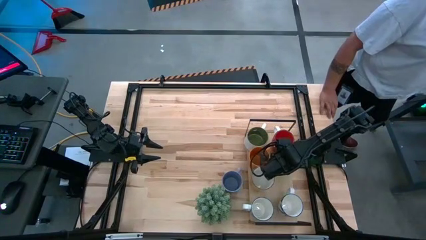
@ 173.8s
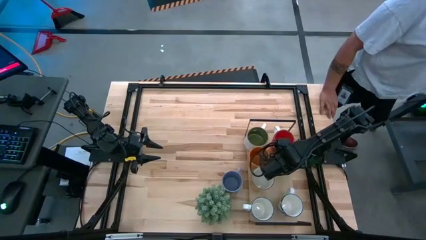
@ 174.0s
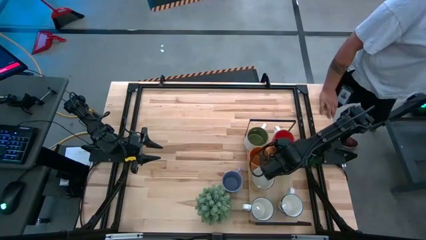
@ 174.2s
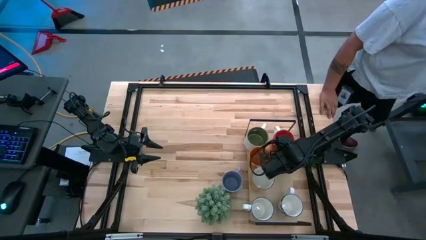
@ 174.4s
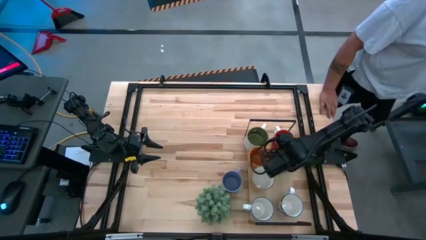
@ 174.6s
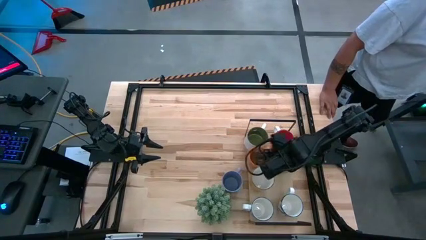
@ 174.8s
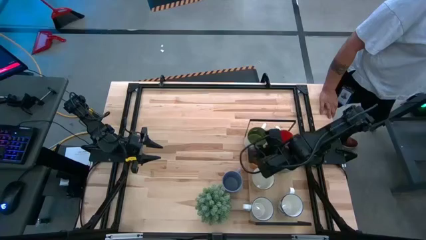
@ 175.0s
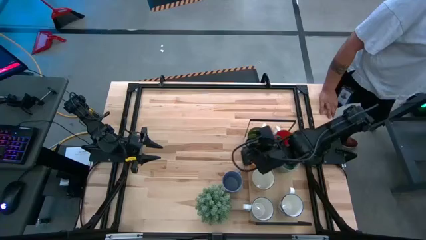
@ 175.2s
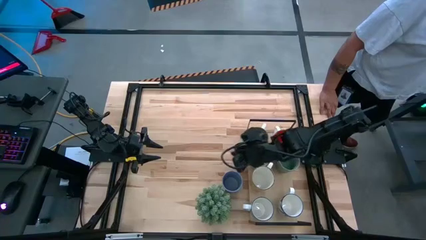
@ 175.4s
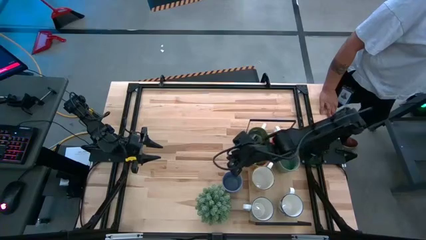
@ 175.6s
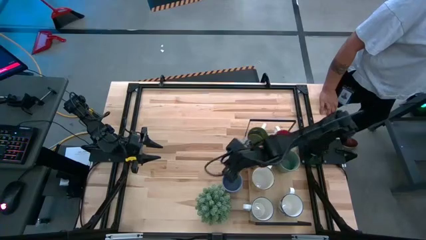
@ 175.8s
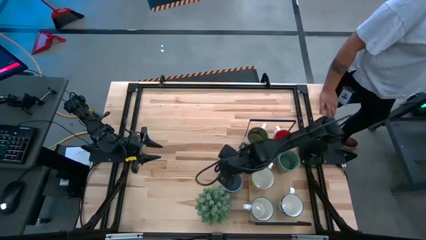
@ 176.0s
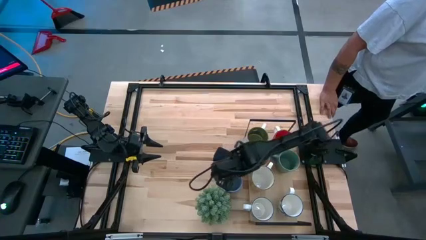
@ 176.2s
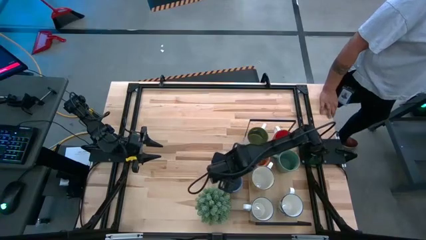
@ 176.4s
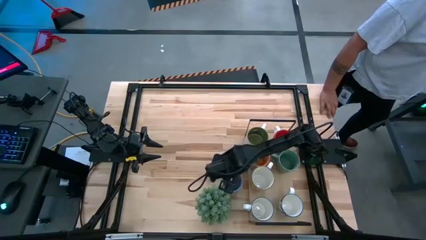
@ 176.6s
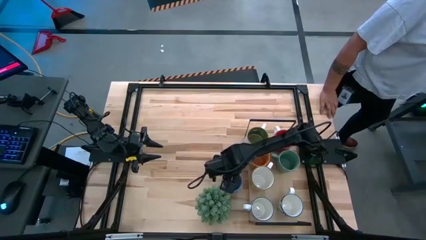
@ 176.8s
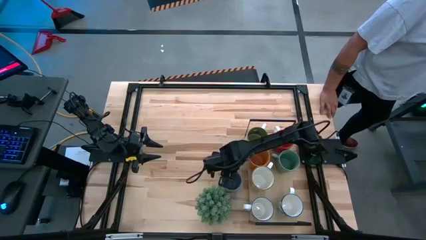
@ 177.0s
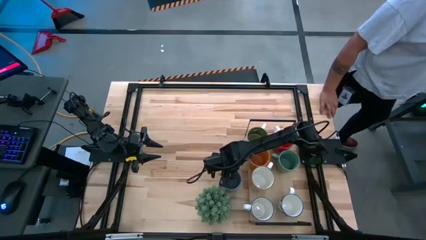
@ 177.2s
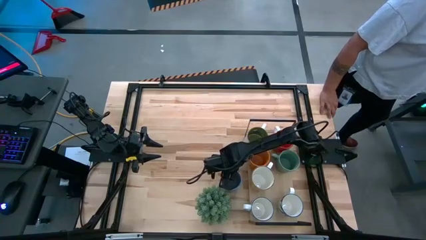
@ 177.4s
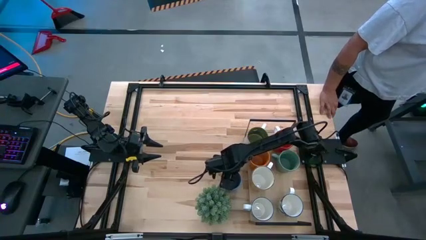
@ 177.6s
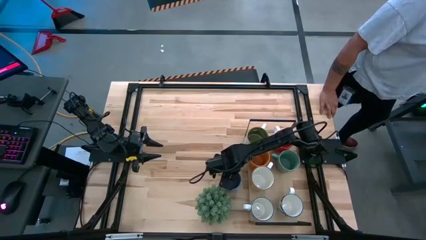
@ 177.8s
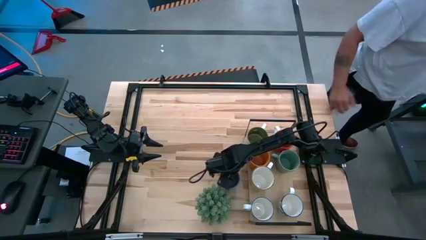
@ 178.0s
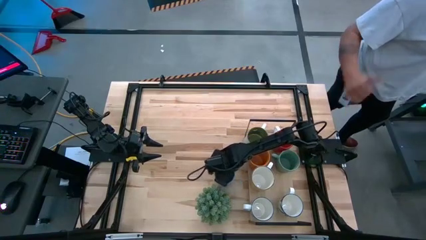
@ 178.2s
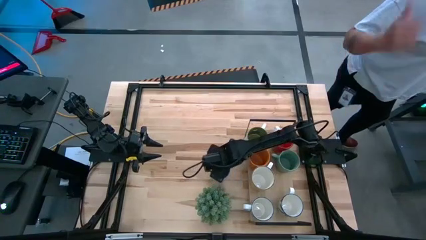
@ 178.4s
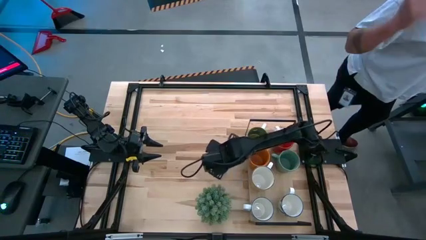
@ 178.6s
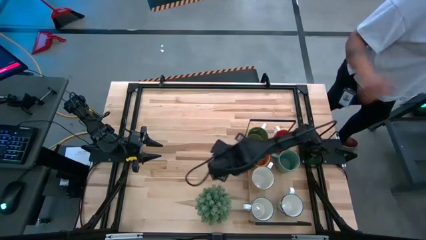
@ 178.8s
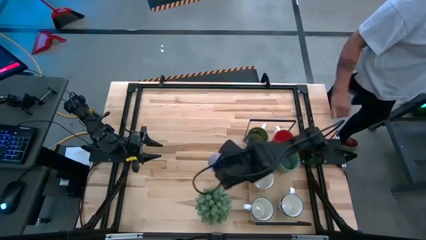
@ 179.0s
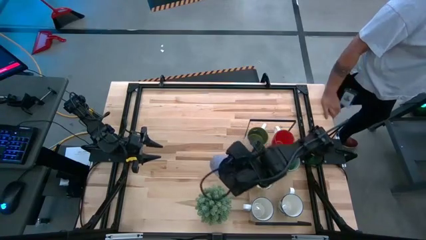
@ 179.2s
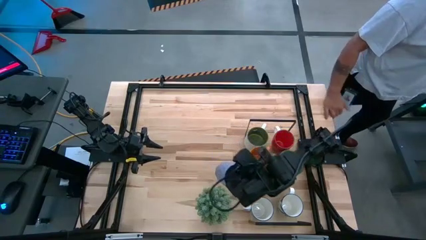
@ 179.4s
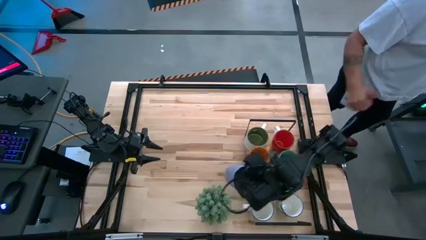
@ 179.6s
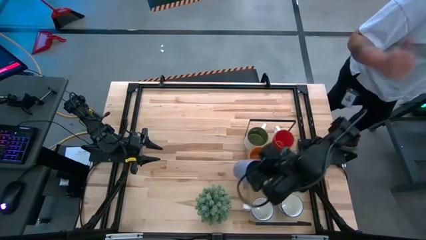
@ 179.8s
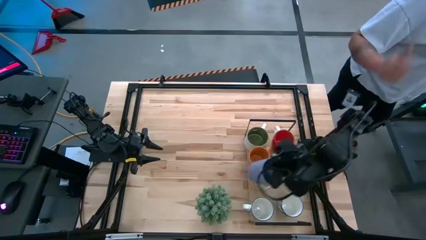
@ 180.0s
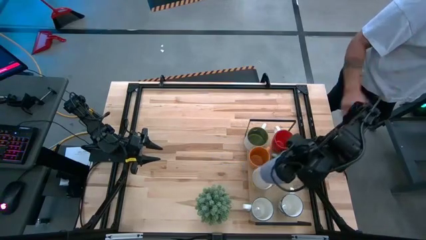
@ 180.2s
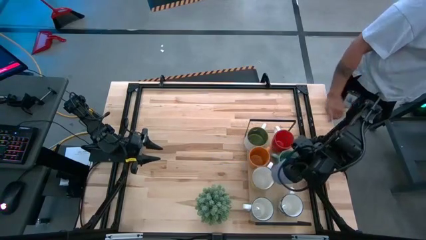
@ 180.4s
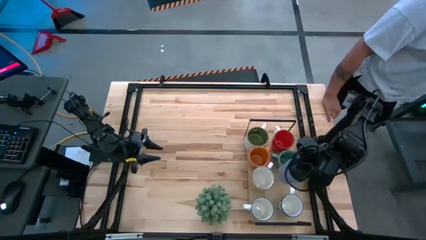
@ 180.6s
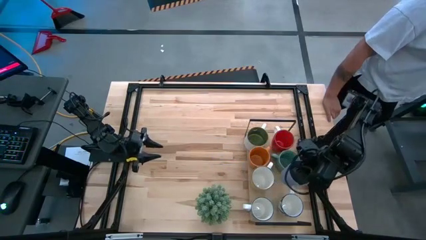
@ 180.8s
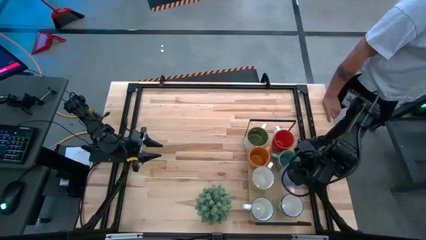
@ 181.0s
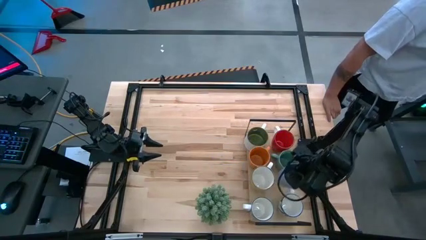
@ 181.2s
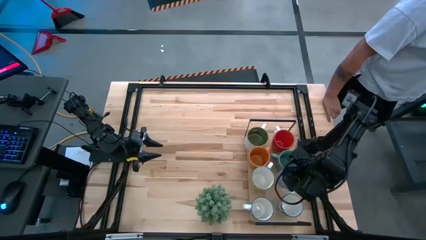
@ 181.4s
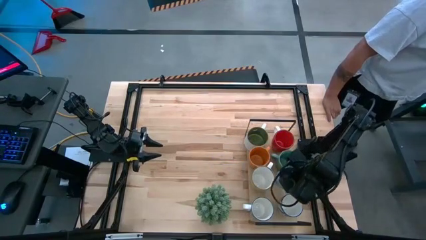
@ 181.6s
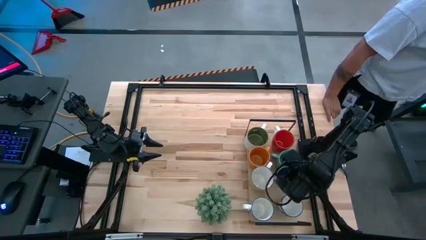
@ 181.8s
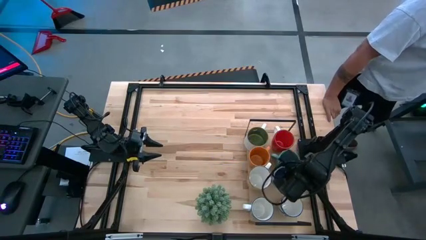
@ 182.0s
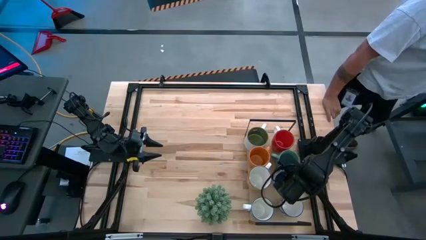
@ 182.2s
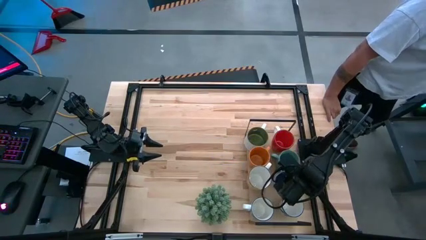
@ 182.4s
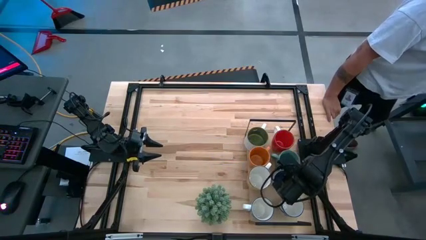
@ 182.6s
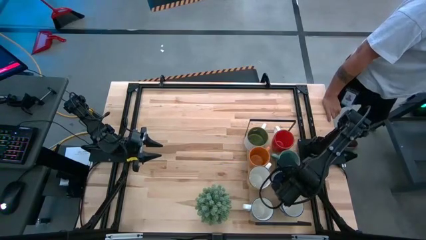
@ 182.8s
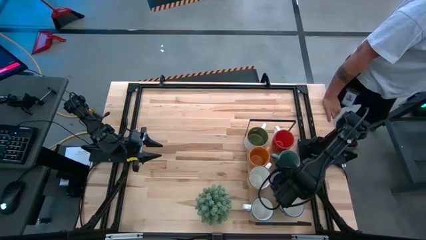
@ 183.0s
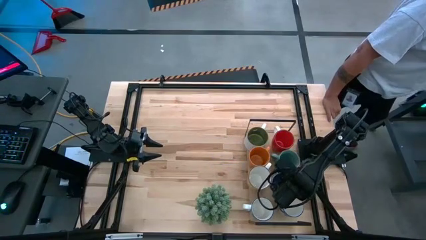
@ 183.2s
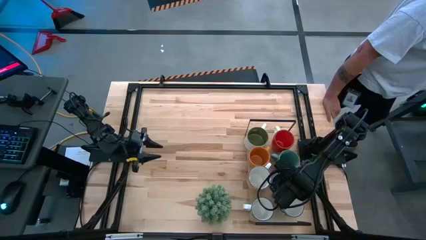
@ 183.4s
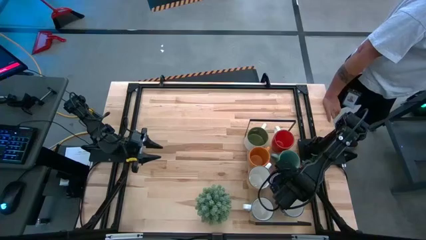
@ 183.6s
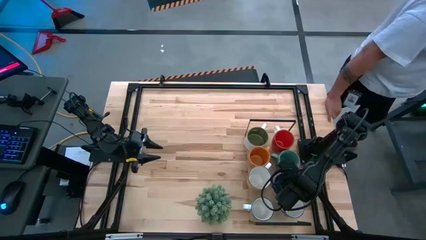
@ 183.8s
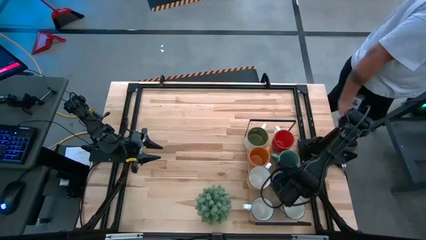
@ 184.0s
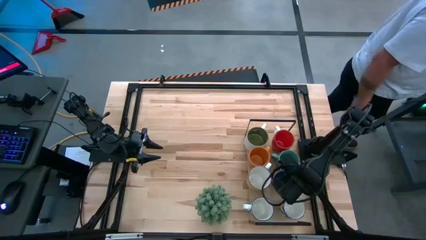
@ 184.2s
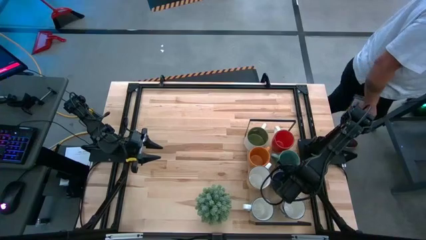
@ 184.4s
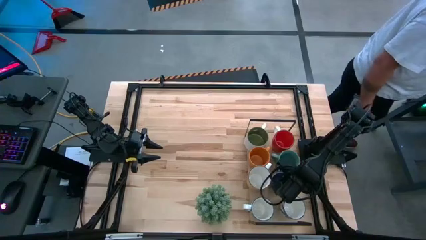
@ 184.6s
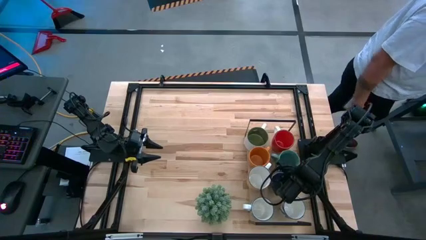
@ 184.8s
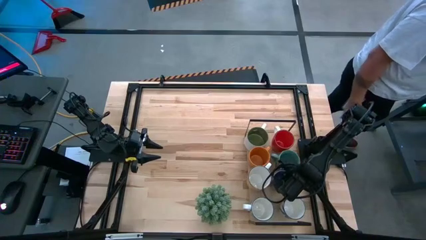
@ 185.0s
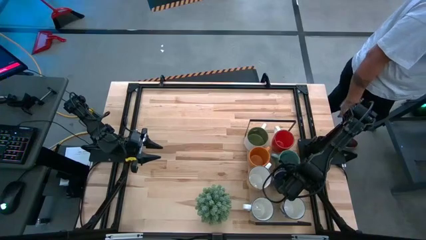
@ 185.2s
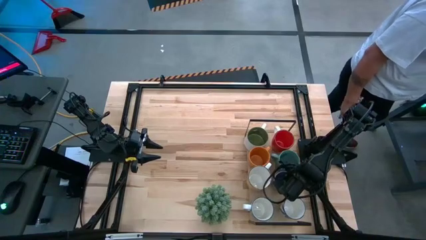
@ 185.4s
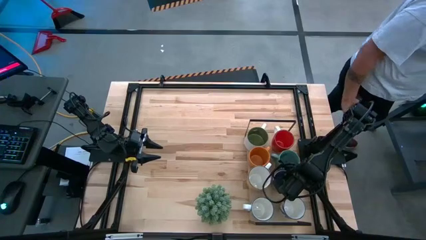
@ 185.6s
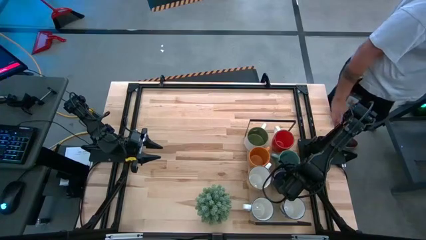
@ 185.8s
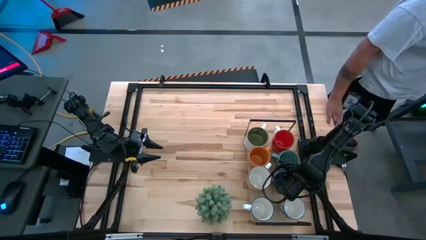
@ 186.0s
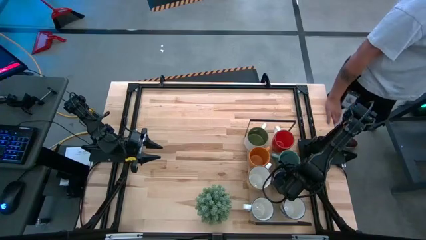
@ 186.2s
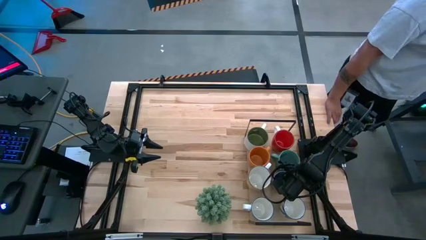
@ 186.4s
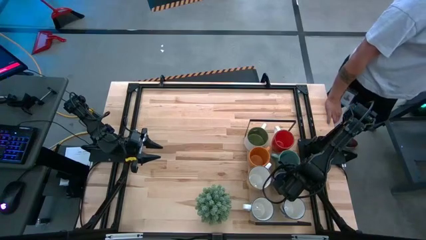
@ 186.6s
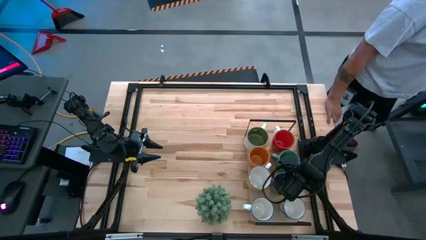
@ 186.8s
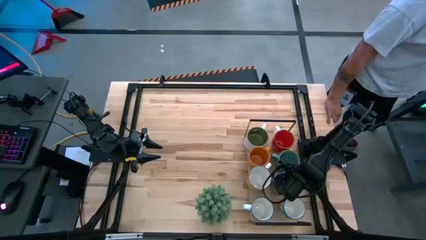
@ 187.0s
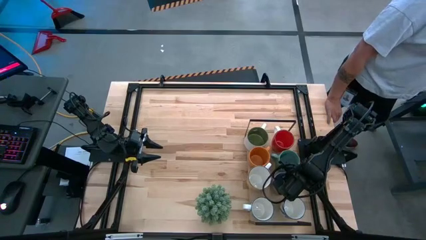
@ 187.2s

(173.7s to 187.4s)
Task: Place coffee mugs
Put the light blue mug on the shelf
